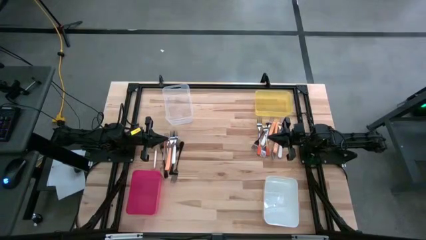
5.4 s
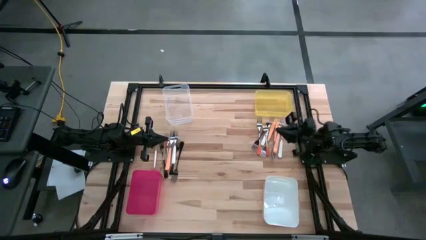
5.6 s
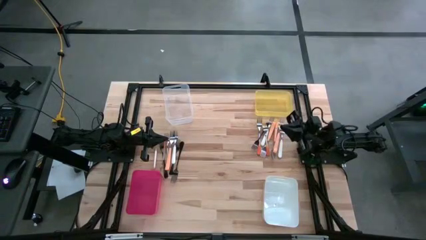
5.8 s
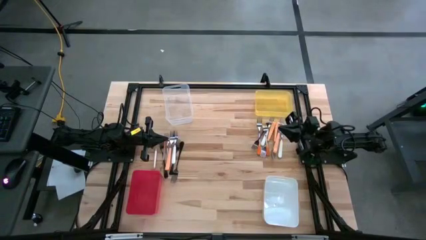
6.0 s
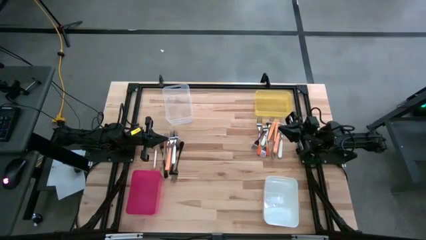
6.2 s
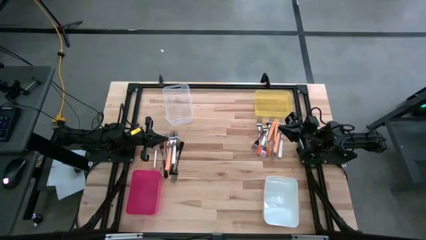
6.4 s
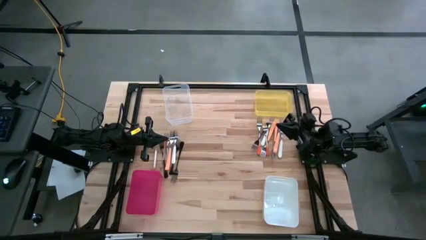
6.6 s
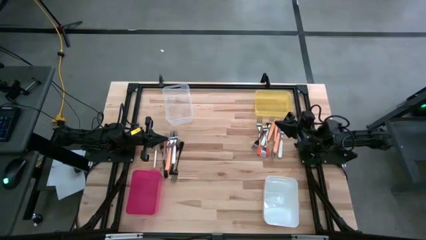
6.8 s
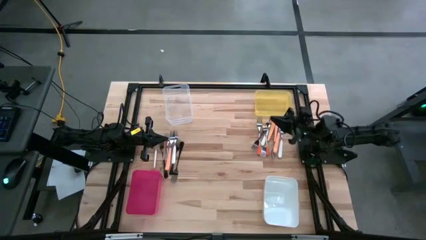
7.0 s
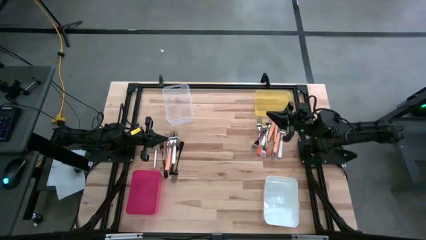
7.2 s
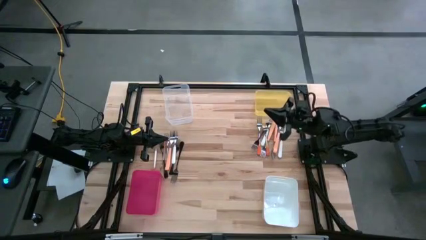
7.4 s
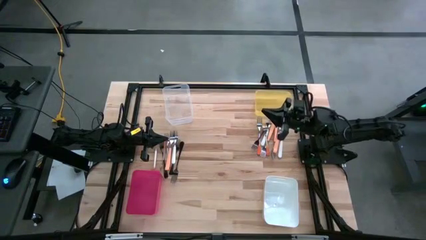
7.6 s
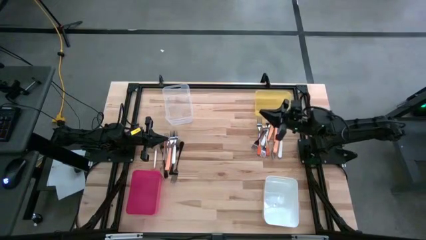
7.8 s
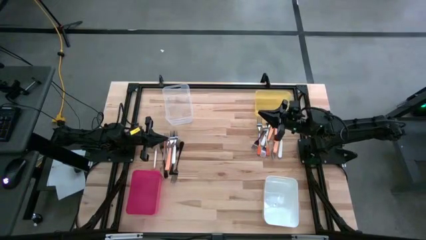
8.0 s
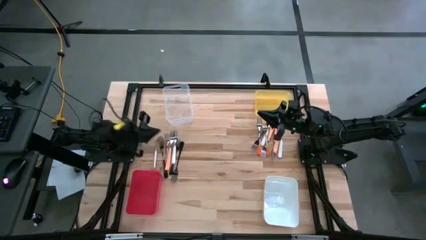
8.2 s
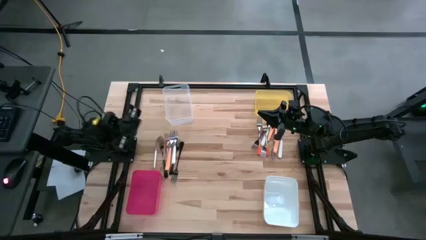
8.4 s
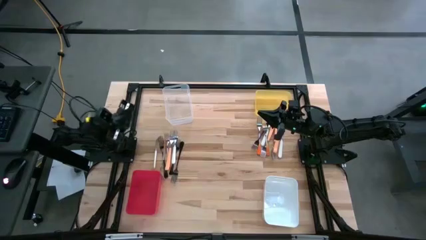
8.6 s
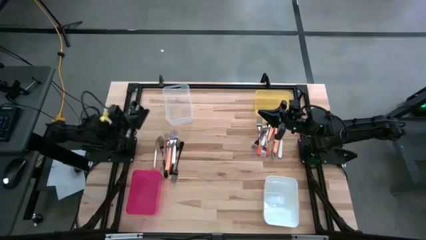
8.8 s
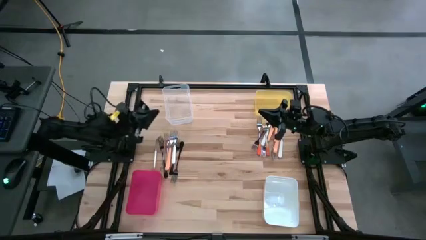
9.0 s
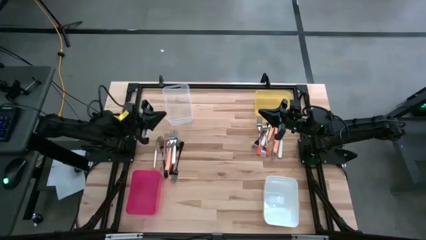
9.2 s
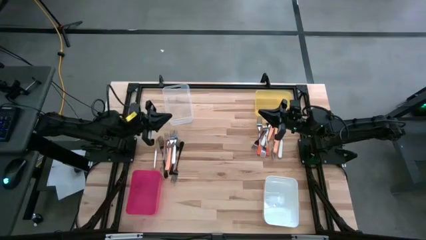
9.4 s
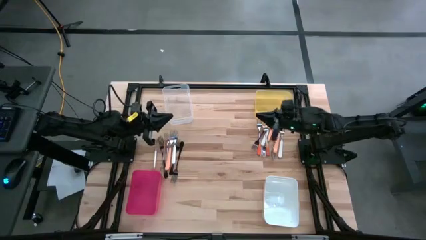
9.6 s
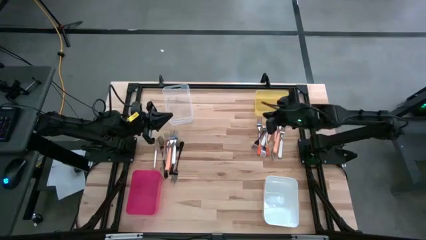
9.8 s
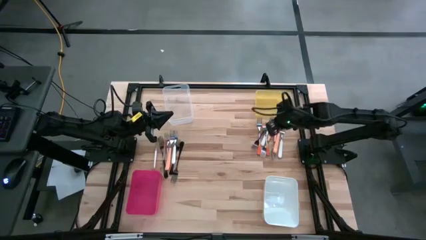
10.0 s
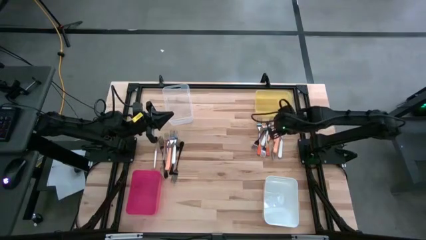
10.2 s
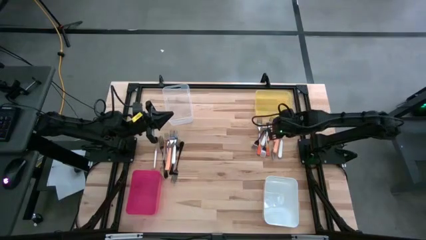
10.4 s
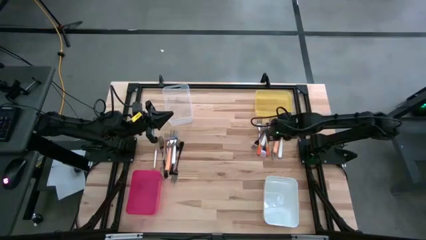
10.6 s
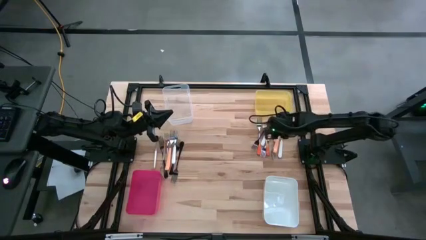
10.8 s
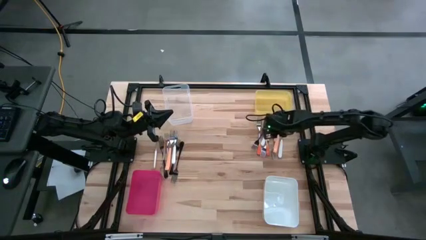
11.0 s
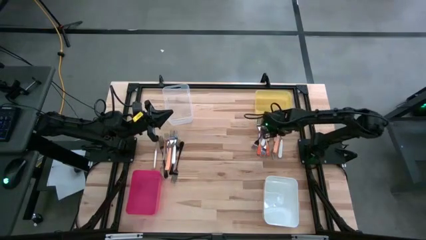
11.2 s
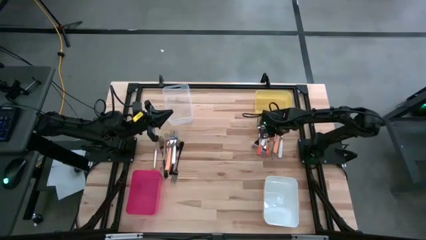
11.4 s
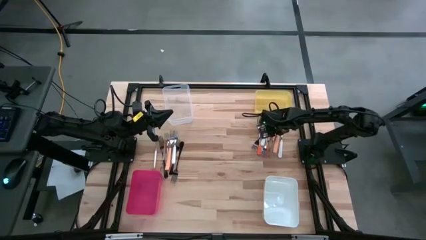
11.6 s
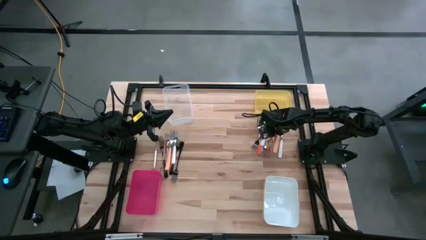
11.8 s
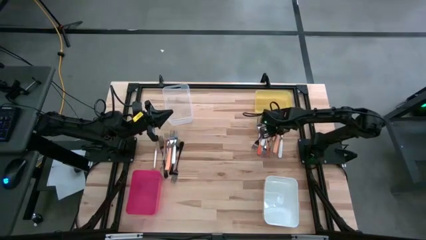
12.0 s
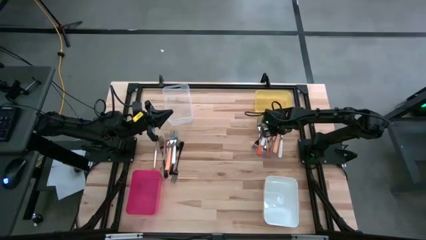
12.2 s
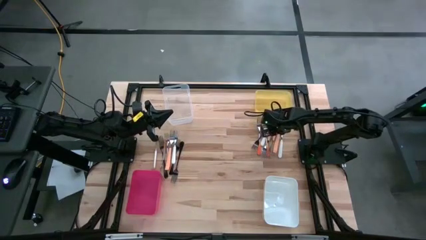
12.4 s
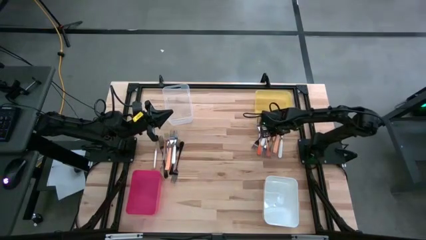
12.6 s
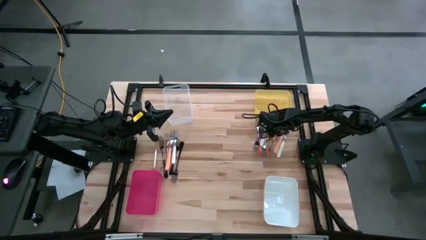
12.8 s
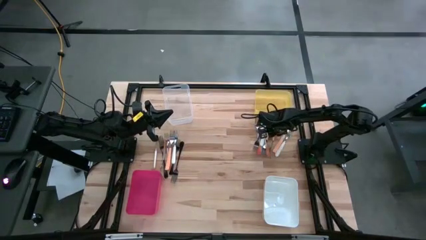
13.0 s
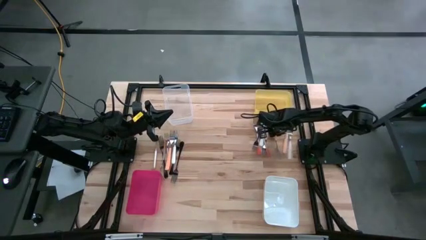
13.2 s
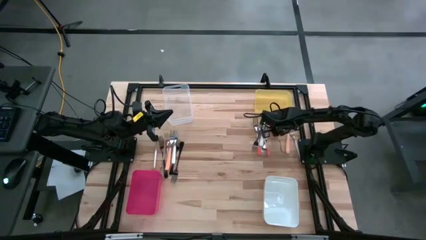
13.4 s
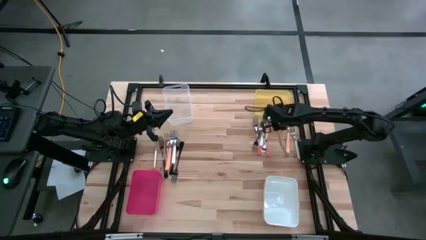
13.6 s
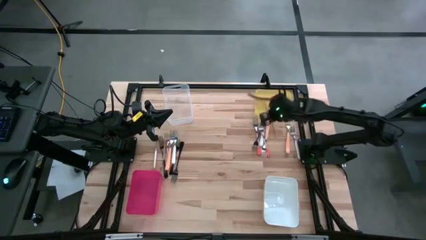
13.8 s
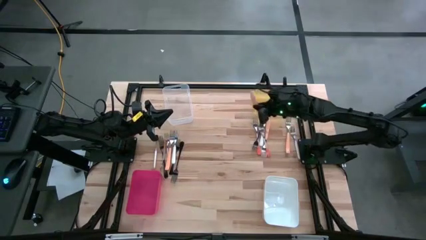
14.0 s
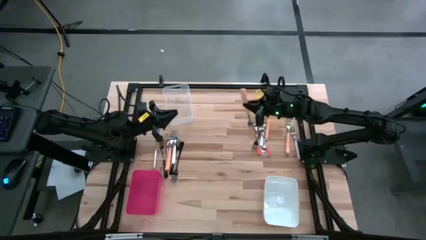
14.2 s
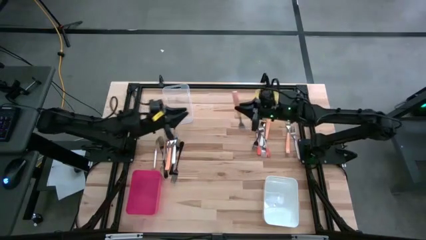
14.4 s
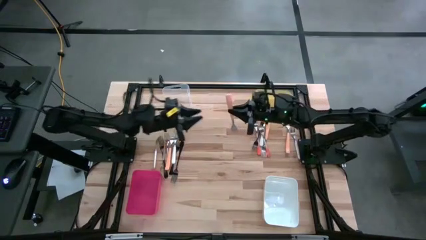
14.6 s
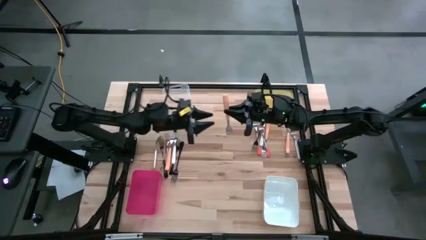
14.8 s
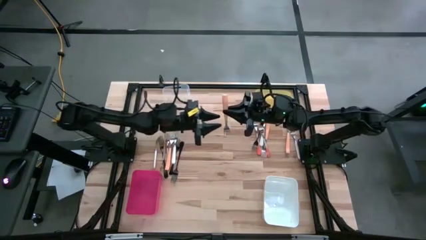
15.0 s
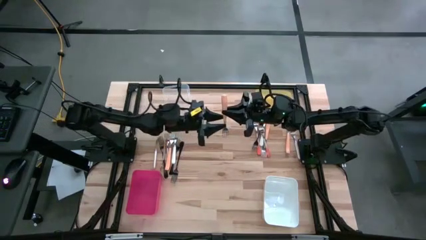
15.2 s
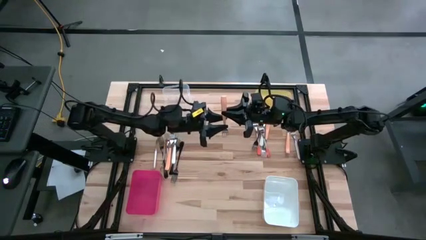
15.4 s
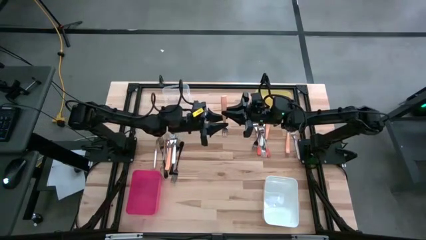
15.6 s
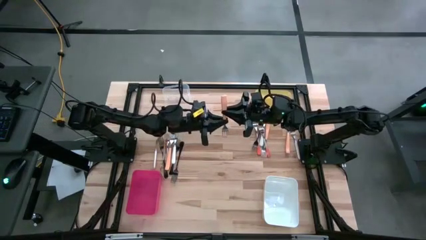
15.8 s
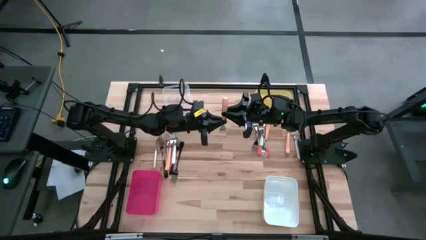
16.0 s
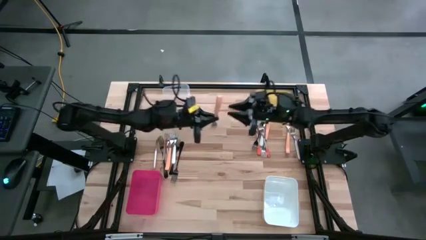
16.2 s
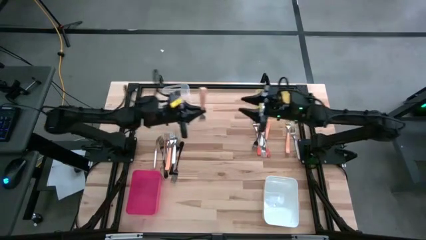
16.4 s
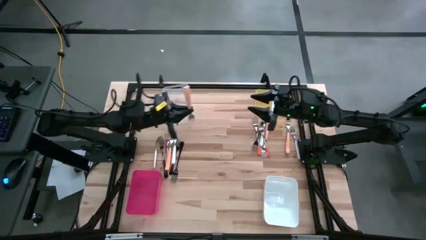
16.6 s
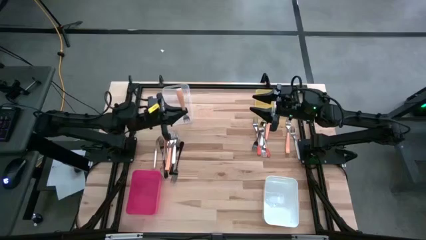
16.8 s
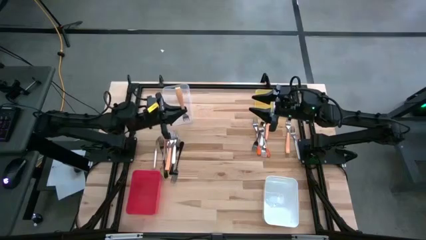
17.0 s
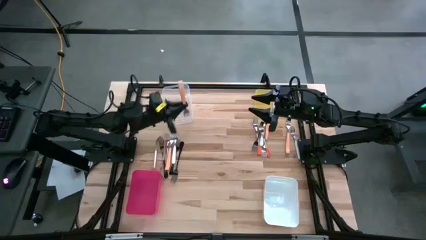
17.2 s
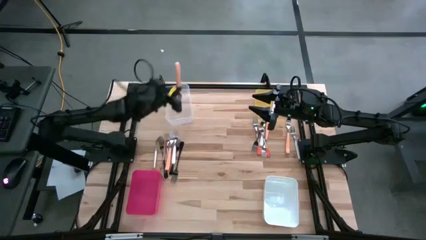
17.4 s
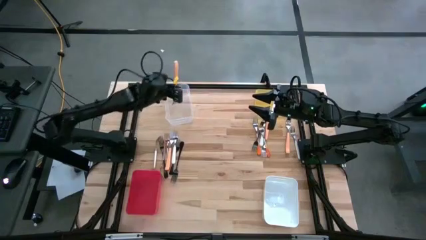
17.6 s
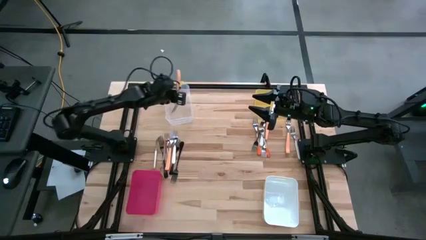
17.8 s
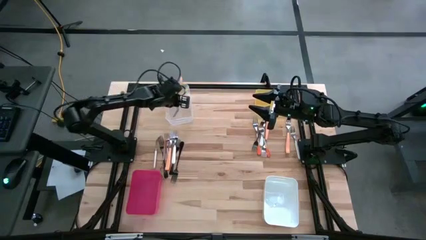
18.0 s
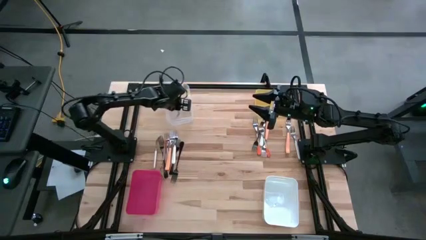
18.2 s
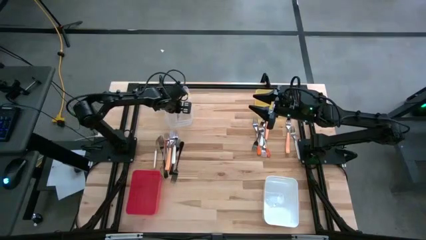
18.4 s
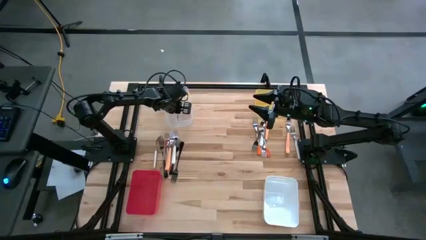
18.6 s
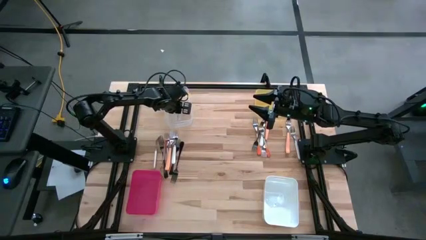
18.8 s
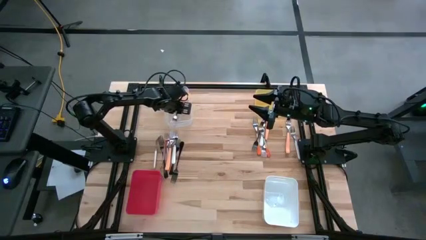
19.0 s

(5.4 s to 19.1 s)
Task: Sort silverware by color (type)
Put the orange fork into the transparent bin
